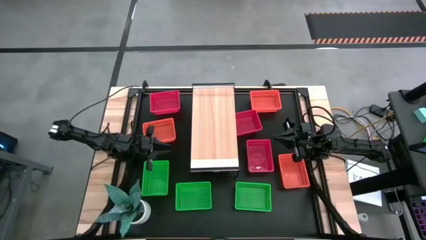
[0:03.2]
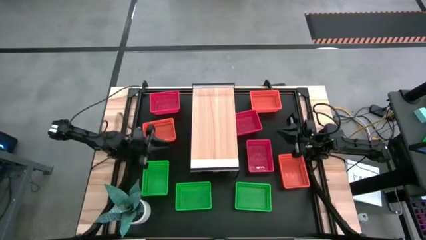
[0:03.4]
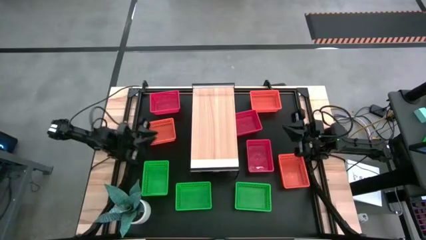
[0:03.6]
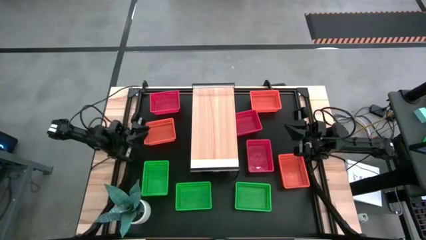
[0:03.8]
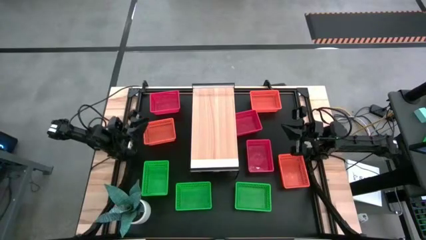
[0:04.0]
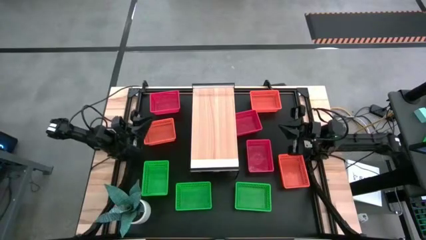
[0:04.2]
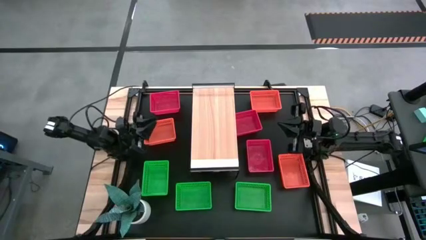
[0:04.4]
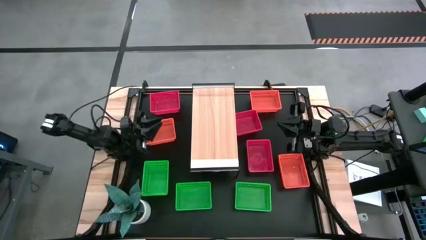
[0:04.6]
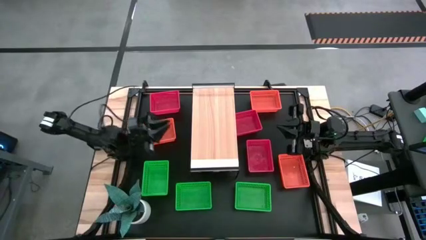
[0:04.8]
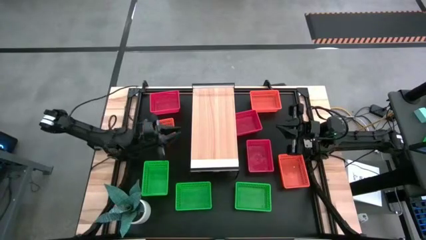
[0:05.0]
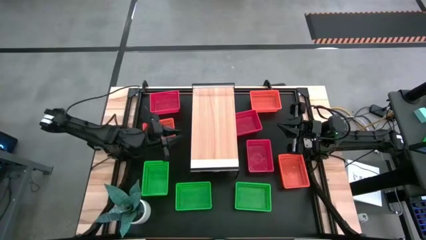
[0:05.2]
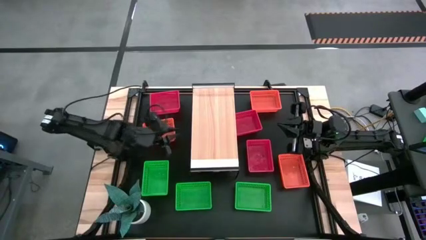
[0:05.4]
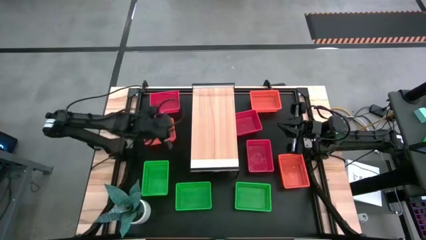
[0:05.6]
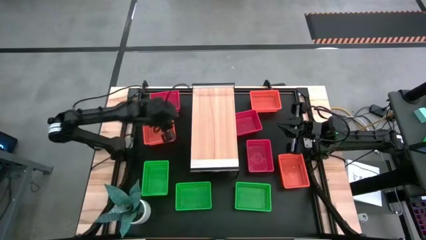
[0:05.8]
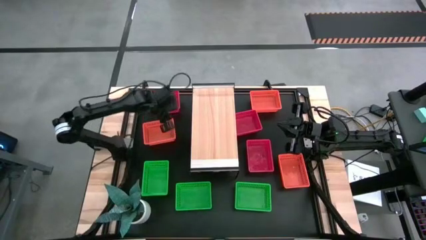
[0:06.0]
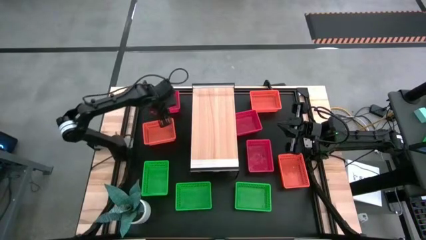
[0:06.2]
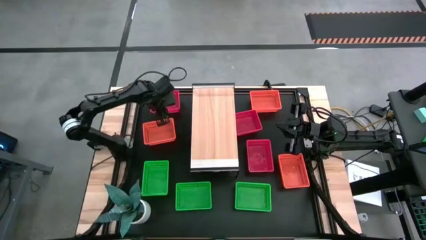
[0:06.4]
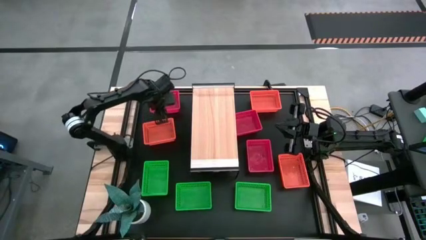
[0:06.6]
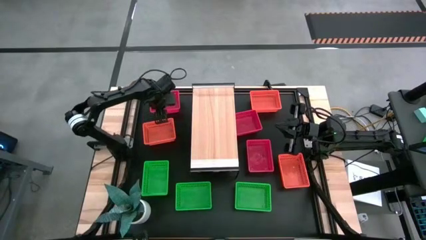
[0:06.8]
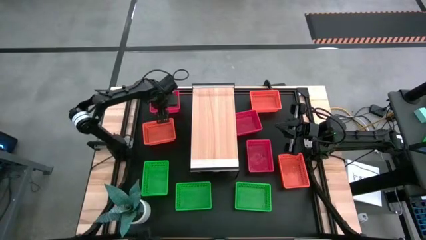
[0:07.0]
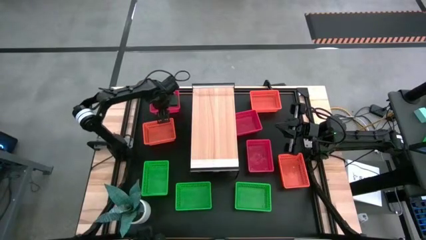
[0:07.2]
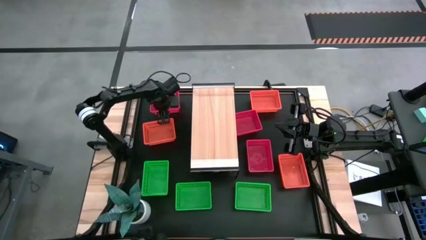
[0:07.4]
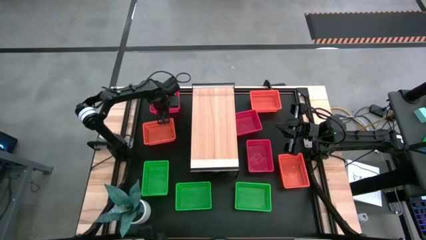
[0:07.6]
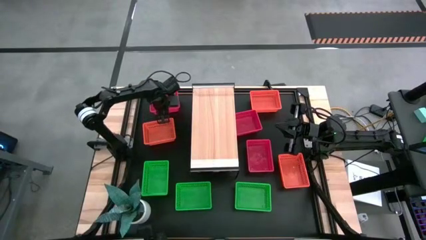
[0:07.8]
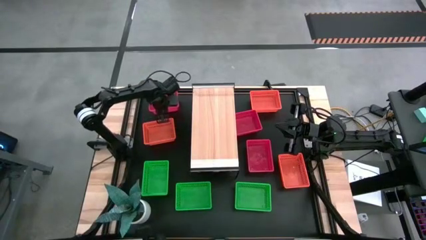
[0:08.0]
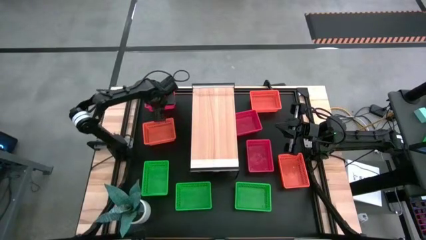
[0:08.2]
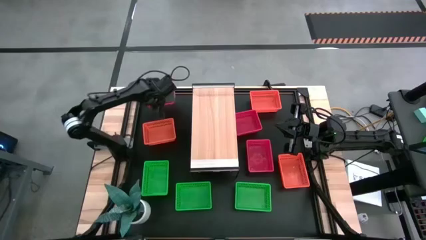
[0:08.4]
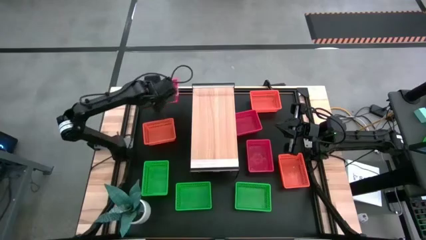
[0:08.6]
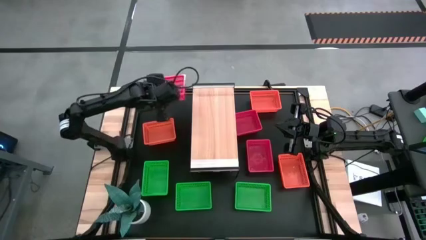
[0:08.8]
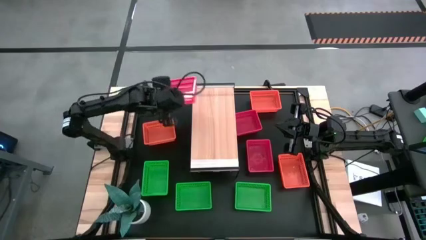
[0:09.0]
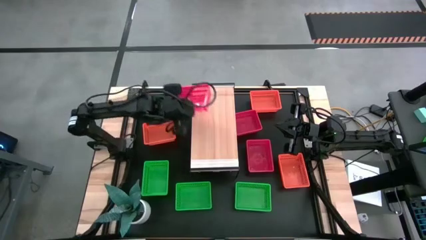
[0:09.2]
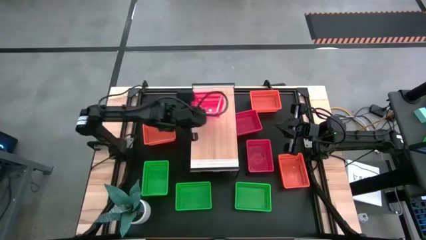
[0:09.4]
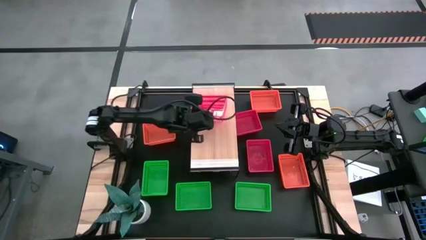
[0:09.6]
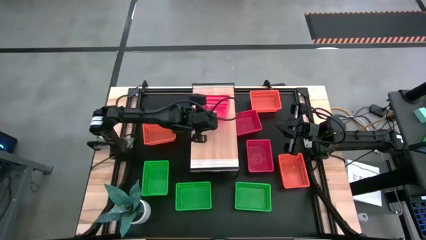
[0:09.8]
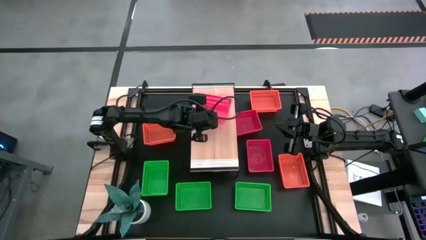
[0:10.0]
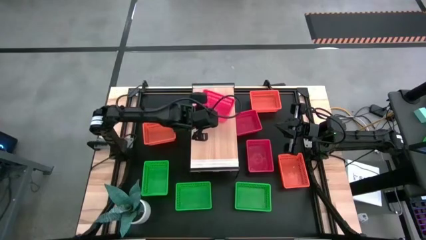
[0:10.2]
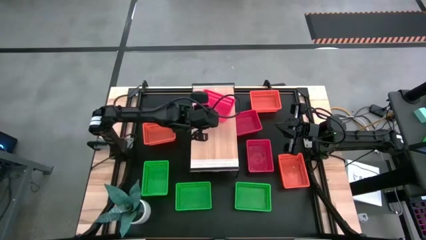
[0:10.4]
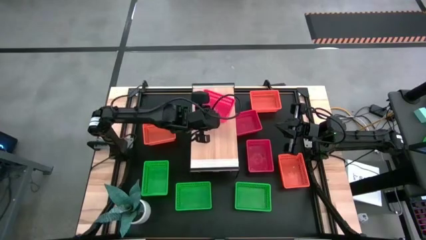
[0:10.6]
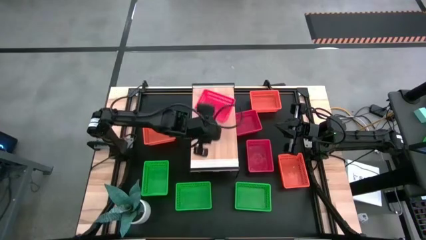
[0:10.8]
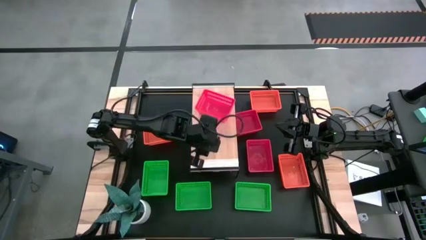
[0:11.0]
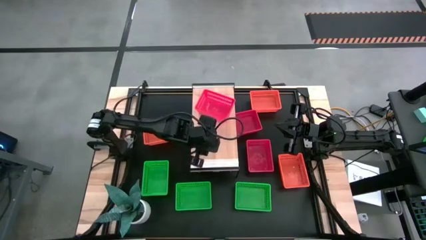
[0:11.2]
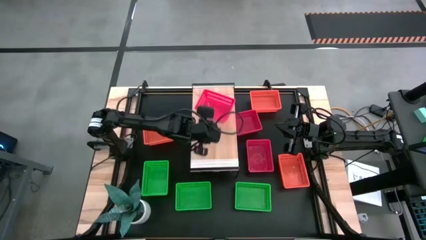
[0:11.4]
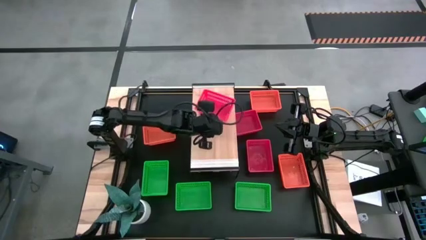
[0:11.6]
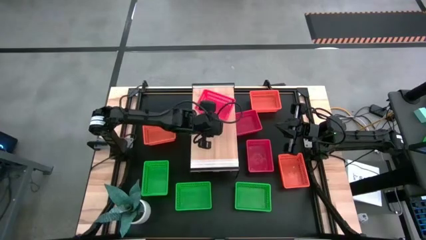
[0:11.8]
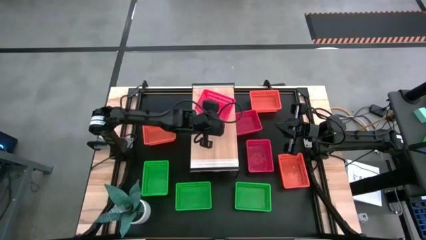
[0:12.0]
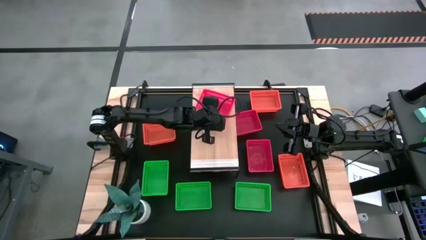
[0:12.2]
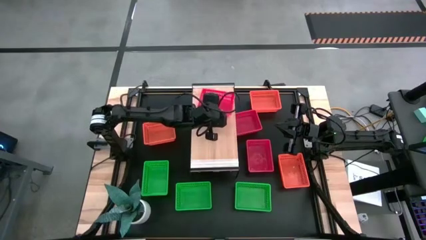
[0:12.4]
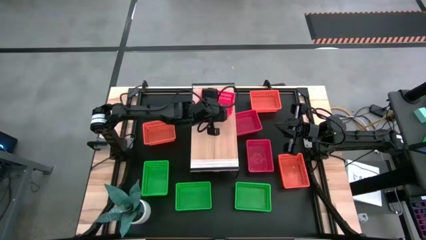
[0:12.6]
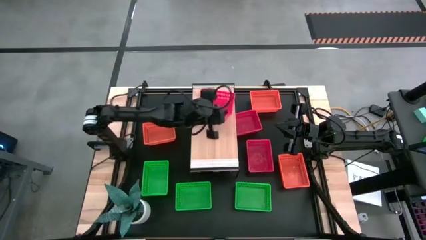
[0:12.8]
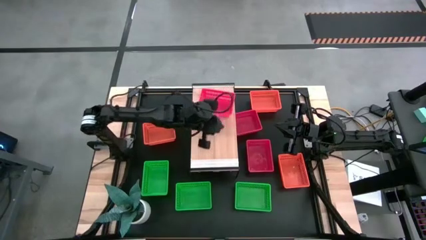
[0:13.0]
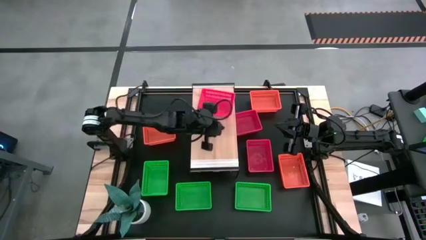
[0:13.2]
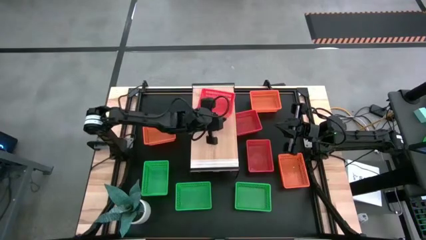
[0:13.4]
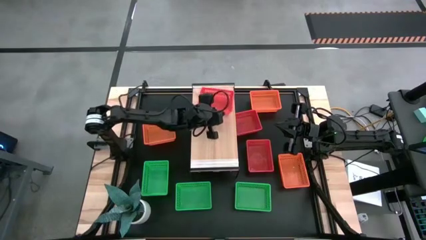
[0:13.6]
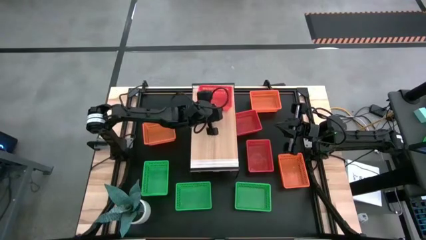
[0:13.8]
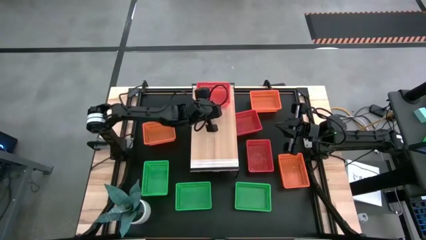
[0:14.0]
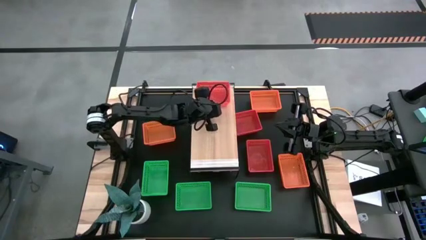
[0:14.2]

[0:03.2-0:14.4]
Task: Stack baskets on shelf by color
Put the top red bin on the shelf
